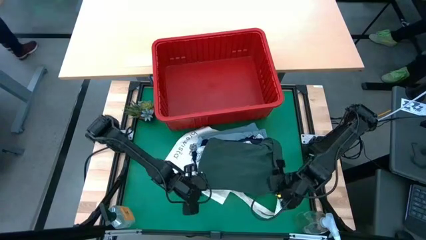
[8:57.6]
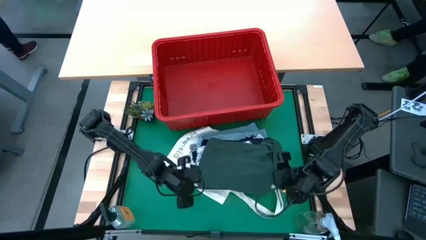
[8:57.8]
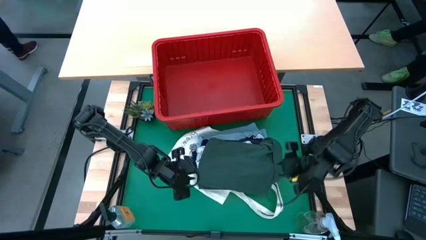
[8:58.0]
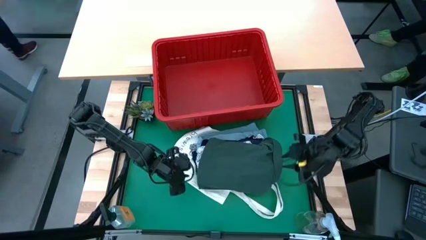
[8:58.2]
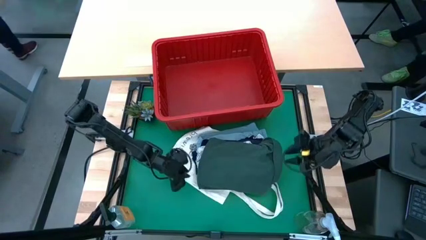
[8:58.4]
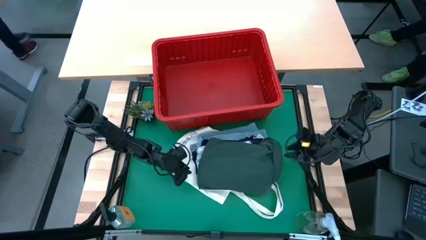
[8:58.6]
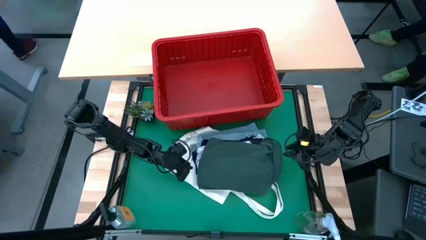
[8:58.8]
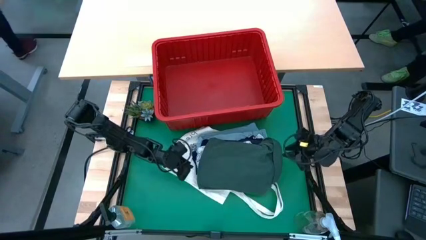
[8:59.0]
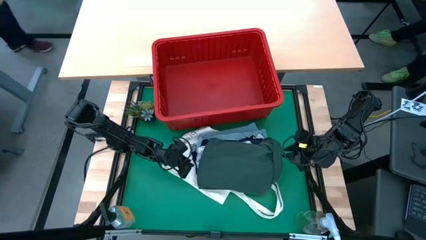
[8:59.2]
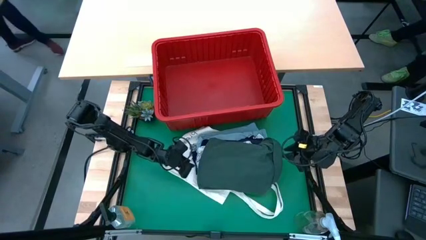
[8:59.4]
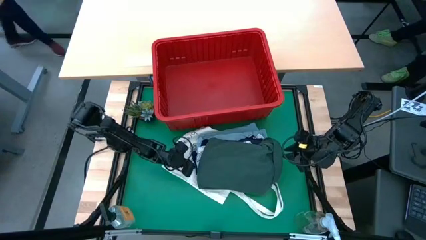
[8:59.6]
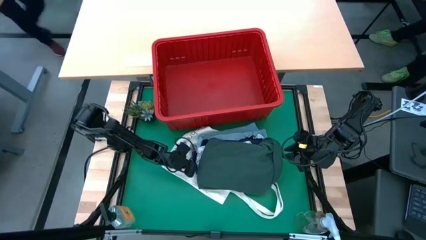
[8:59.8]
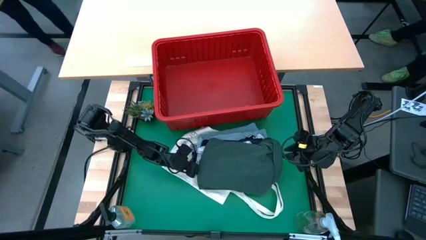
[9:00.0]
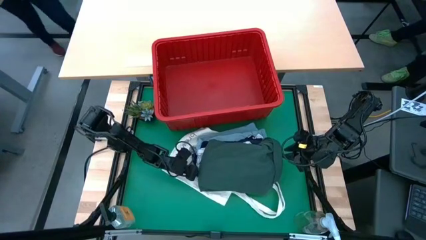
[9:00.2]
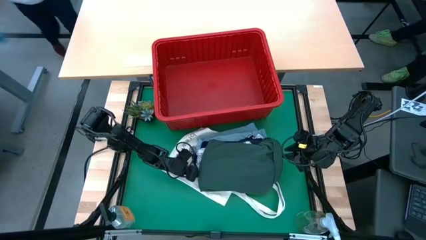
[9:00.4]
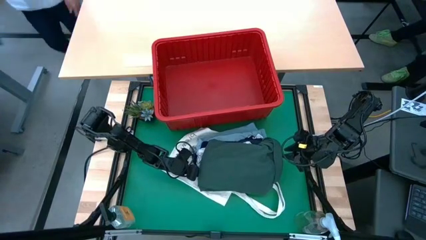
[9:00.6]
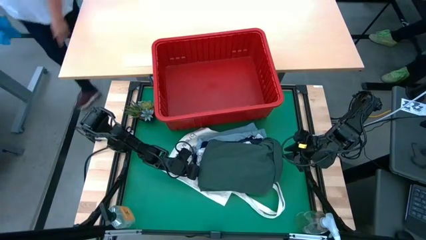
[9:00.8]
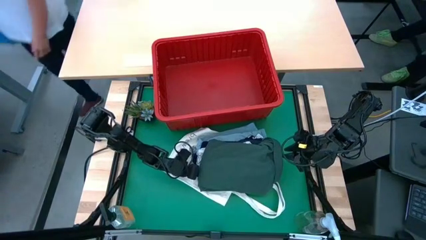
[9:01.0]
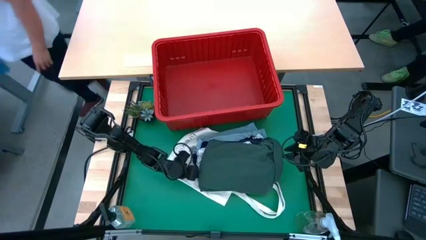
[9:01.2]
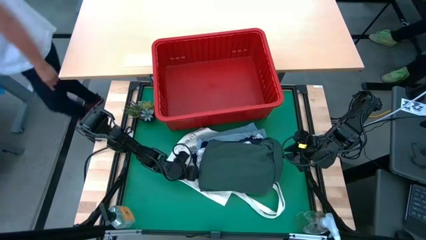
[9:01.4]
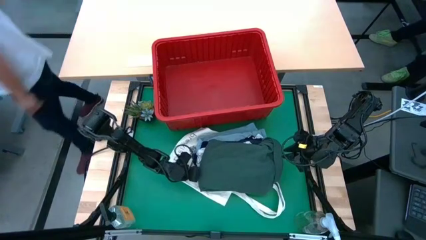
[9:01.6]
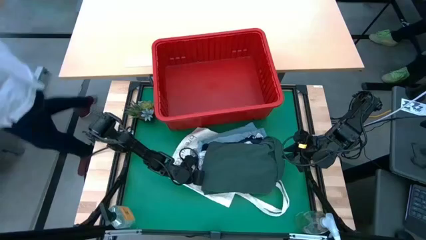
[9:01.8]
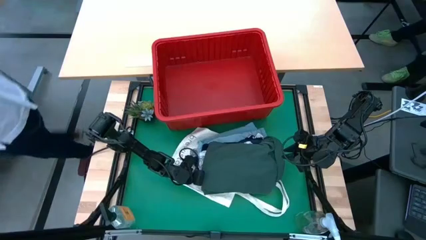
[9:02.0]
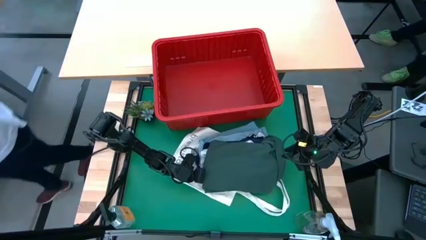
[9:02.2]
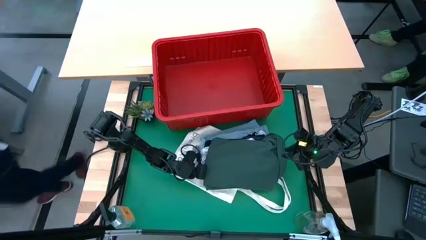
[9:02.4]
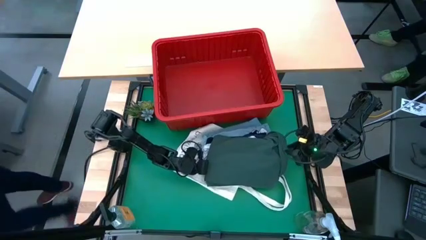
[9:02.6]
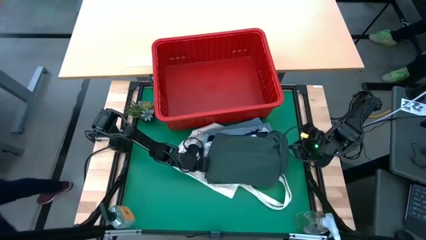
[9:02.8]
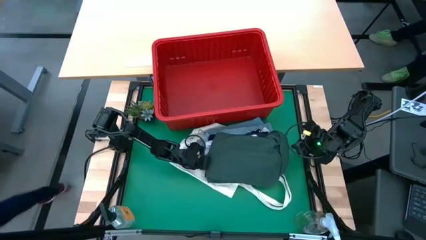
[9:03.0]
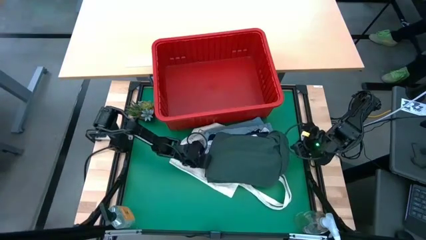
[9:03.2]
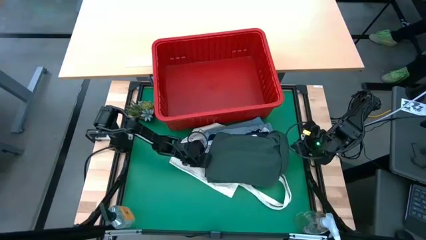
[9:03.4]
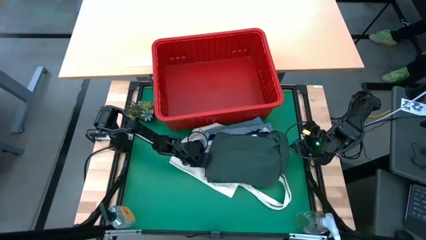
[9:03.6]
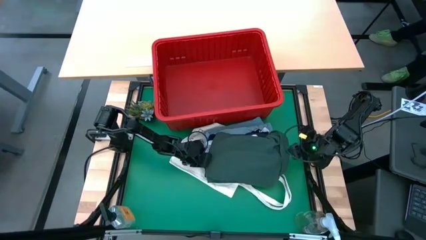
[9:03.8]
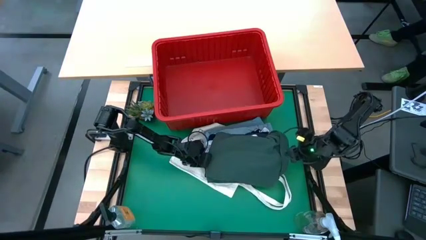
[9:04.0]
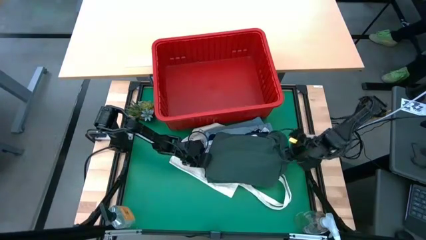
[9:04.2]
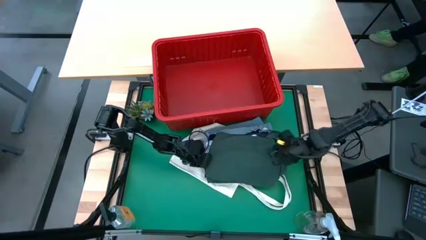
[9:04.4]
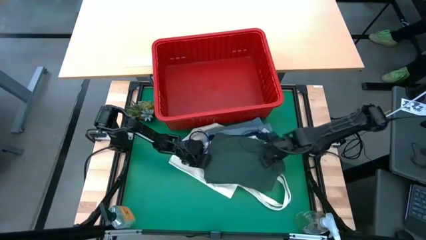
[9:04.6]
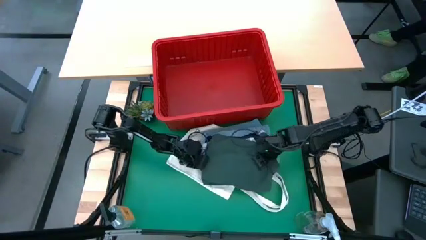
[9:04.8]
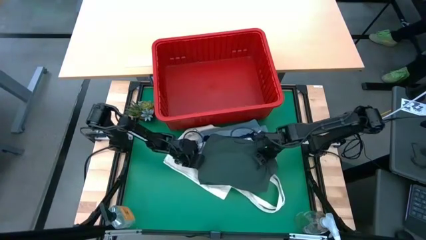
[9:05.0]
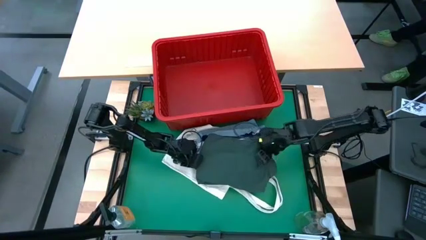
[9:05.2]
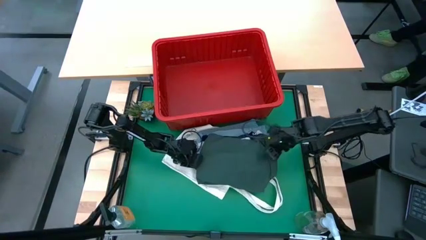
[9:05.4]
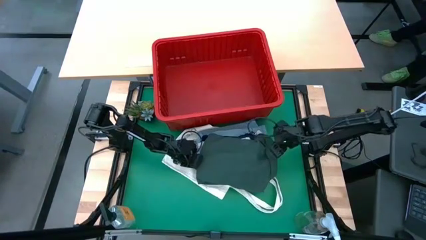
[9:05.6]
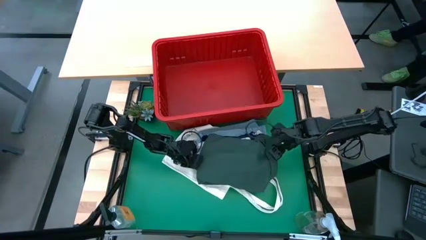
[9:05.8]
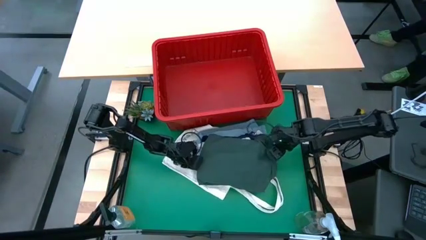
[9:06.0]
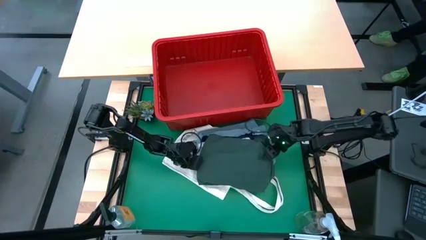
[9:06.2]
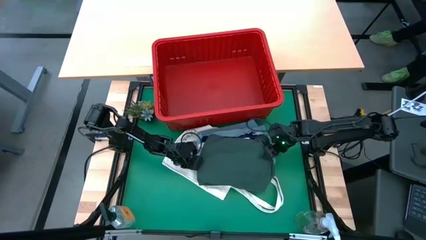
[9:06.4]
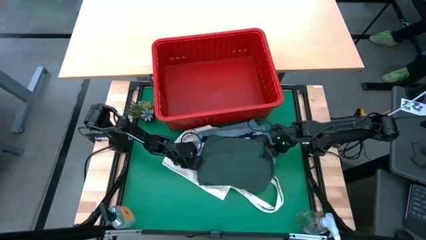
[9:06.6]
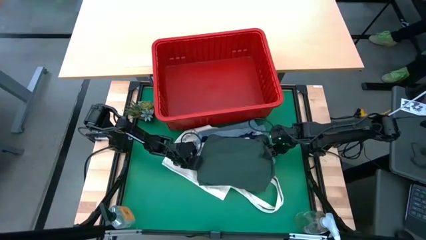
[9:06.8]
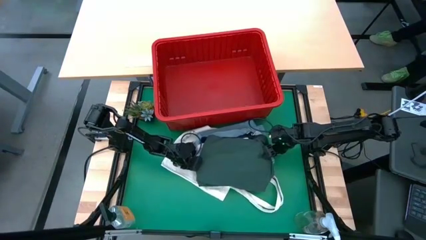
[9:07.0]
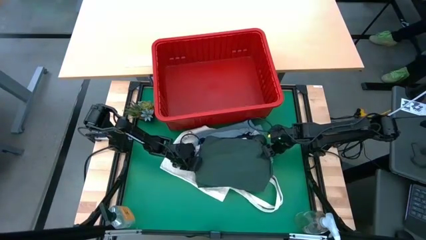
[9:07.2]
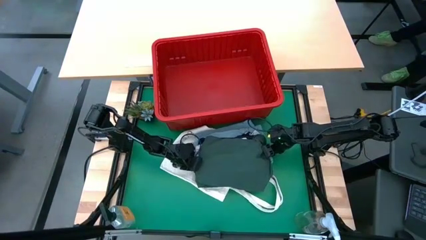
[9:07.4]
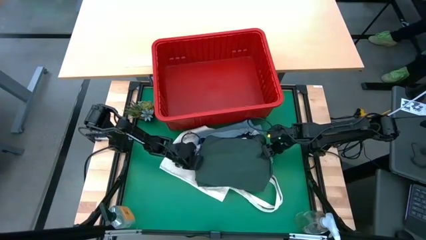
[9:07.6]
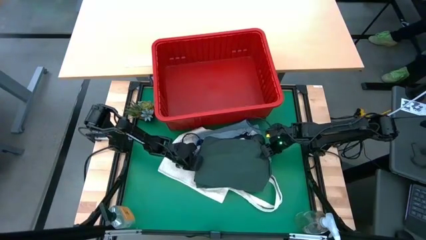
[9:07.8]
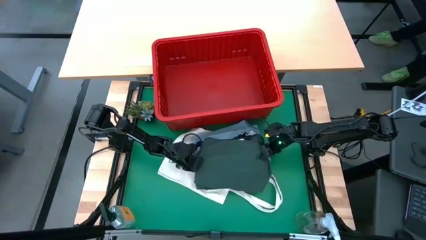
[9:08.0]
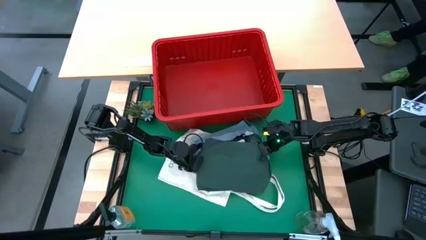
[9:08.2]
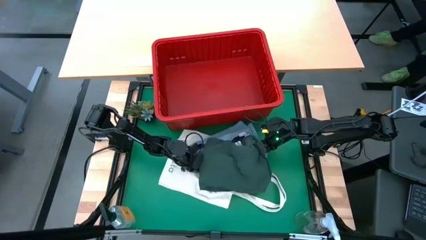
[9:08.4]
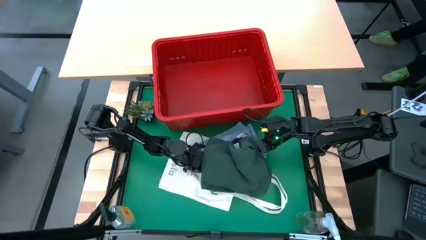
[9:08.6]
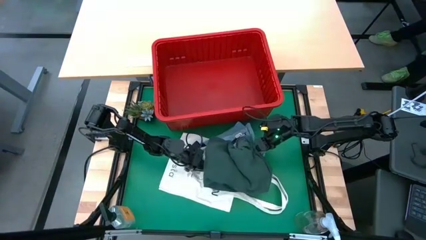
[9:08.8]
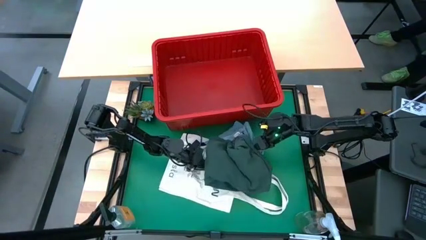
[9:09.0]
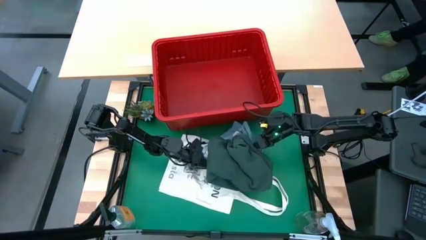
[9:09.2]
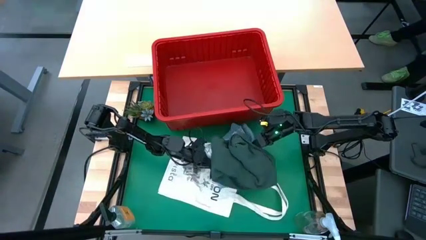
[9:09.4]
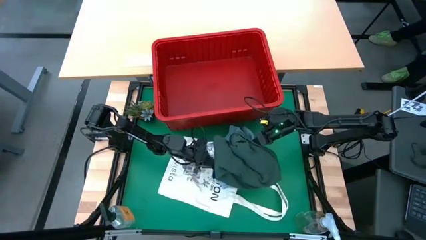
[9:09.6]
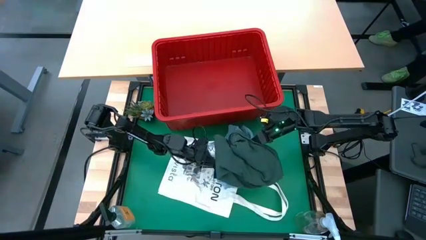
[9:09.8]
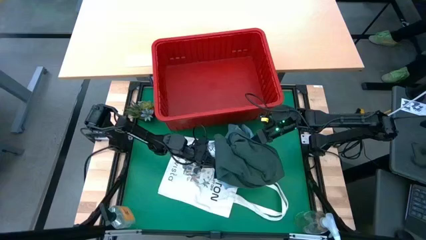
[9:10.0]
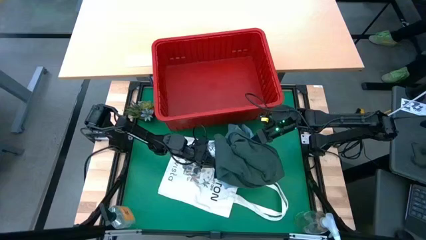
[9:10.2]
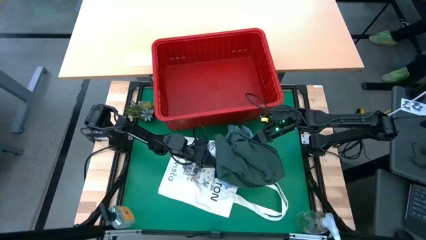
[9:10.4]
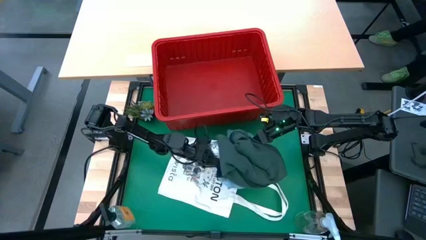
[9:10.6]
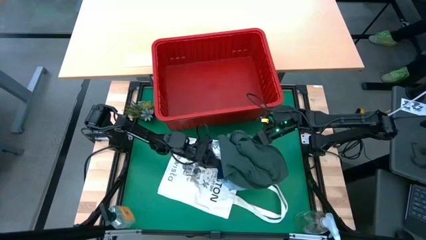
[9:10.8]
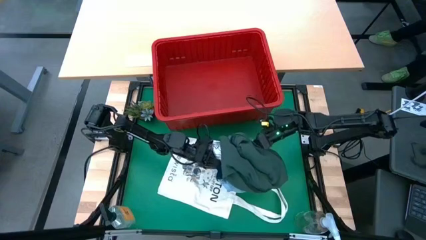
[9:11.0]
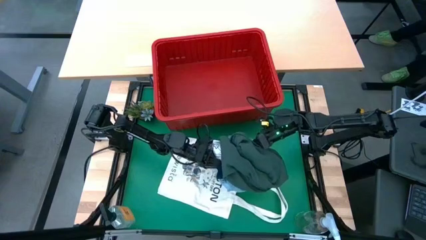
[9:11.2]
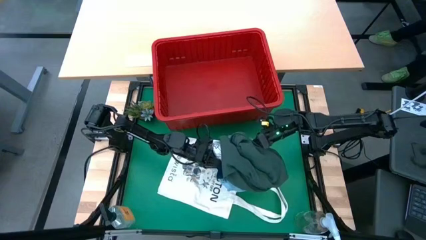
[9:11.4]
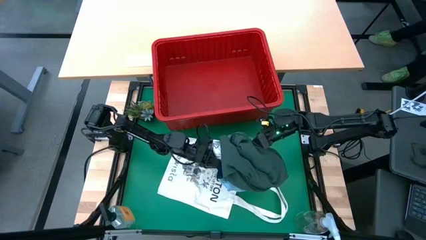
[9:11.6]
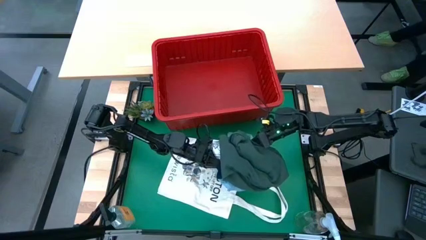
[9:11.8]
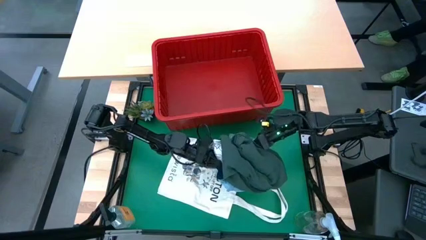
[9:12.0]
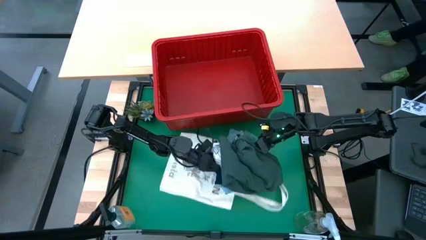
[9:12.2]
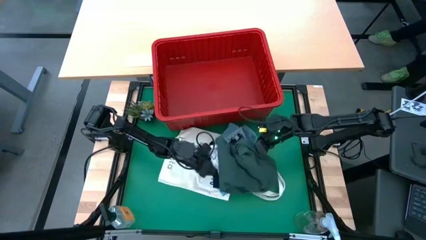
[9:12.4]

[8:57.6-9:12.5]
Task: Fold laundry
Put the clothes into the red bin
